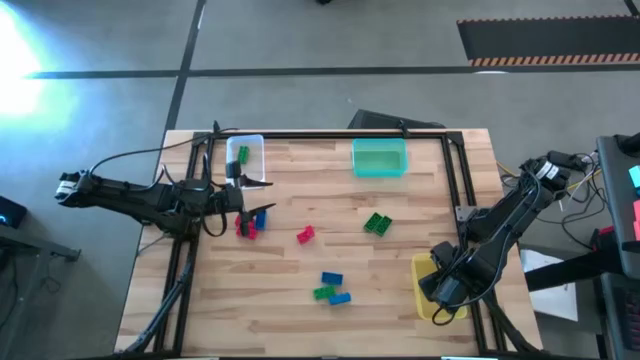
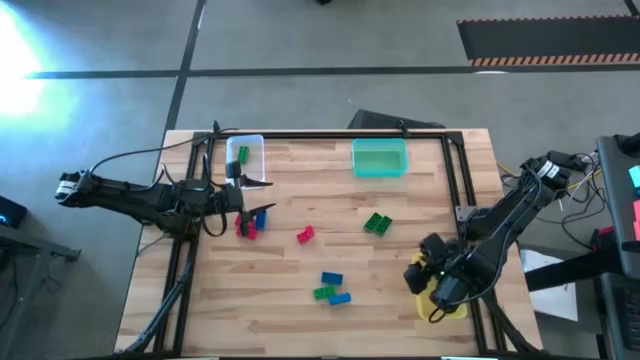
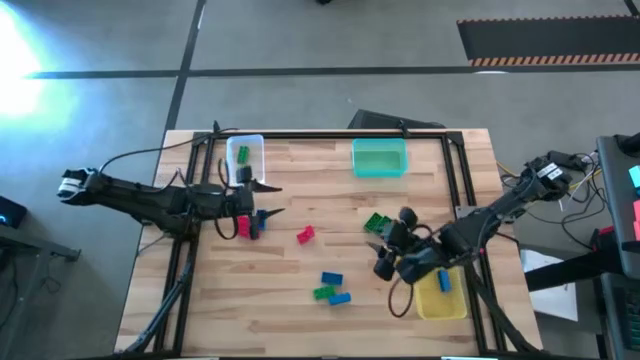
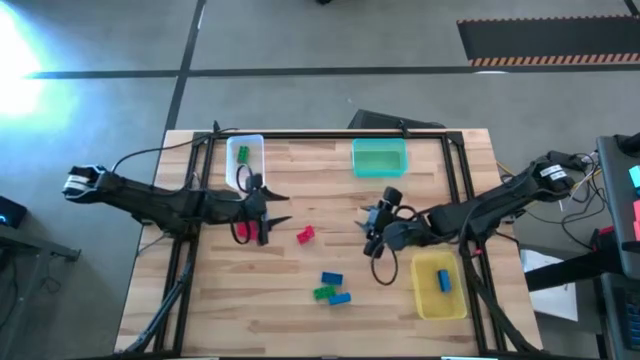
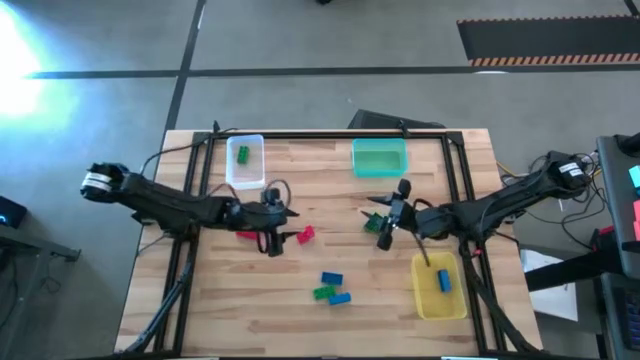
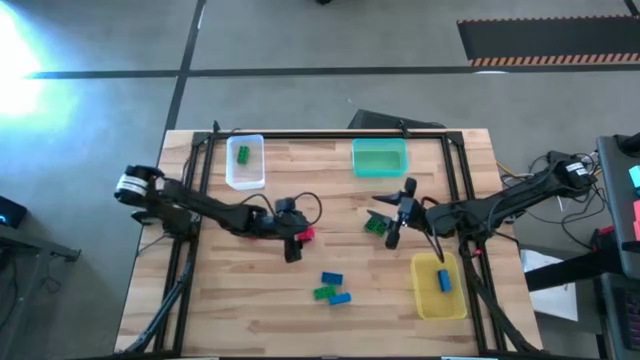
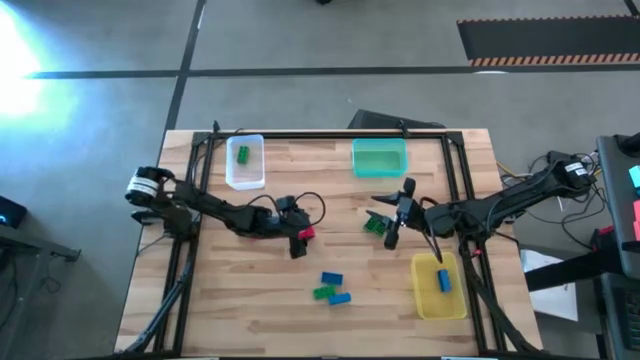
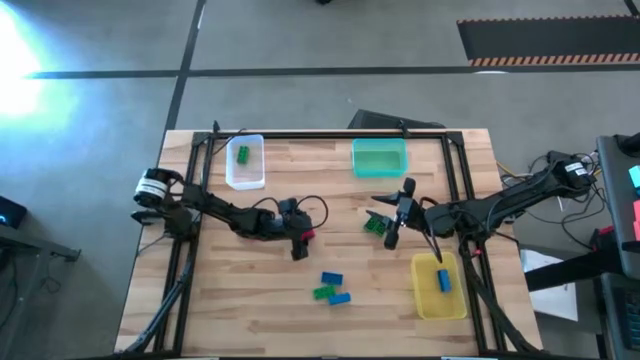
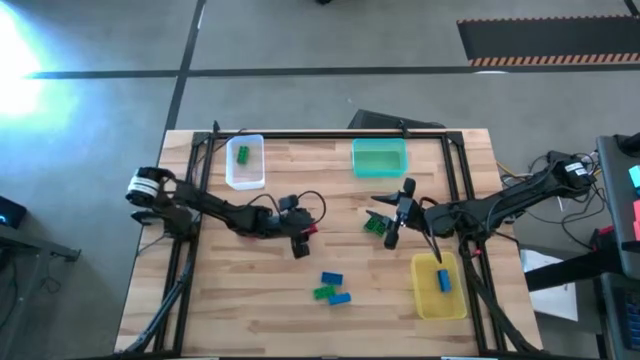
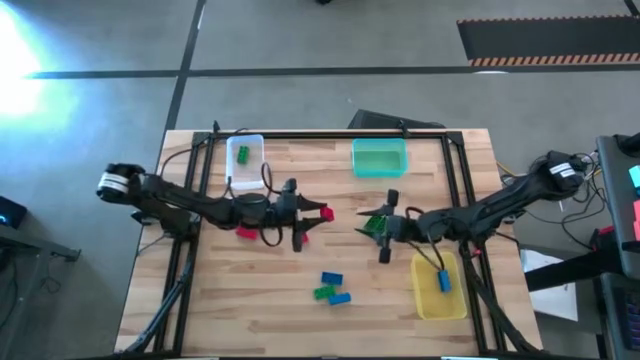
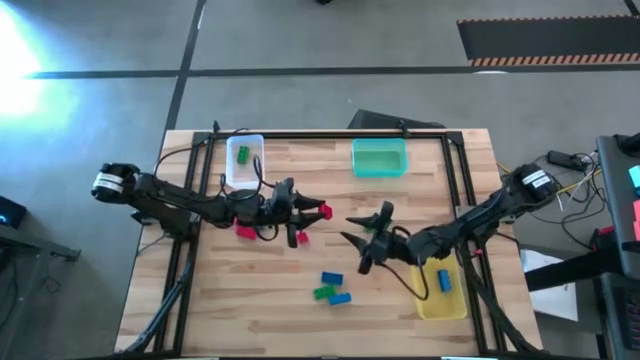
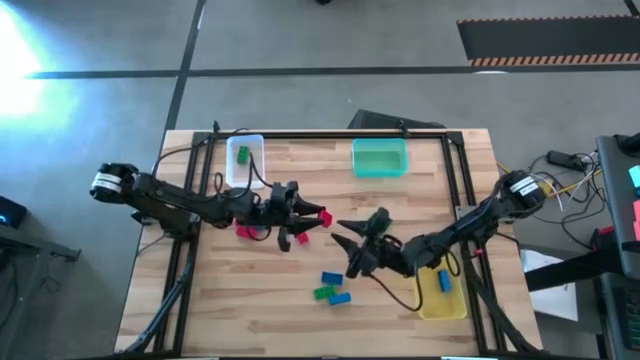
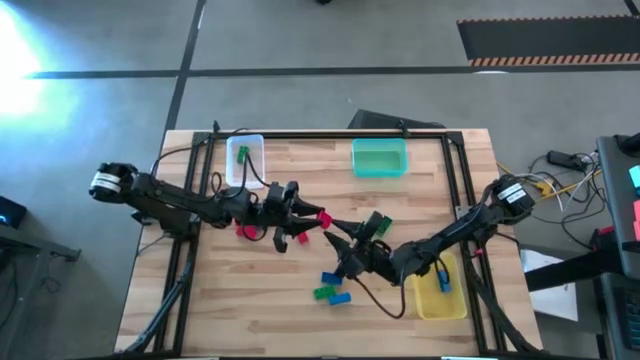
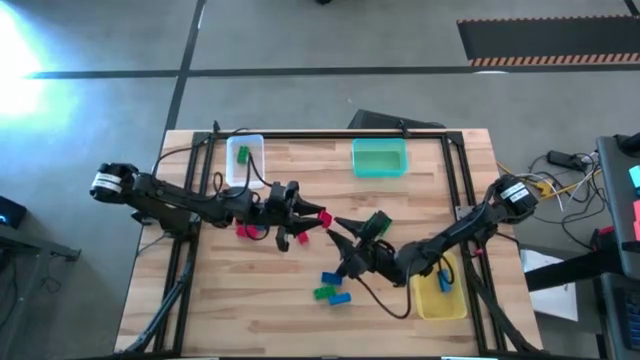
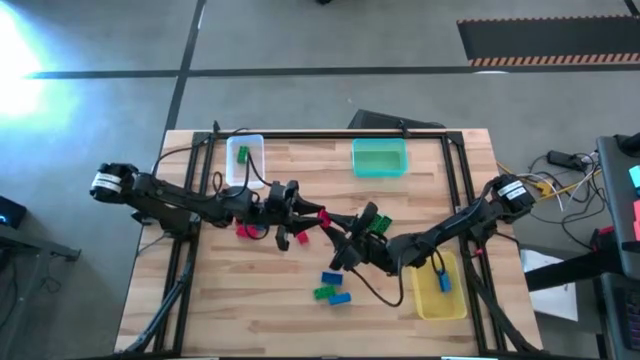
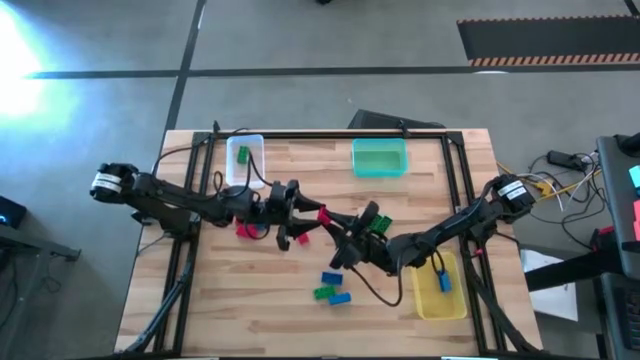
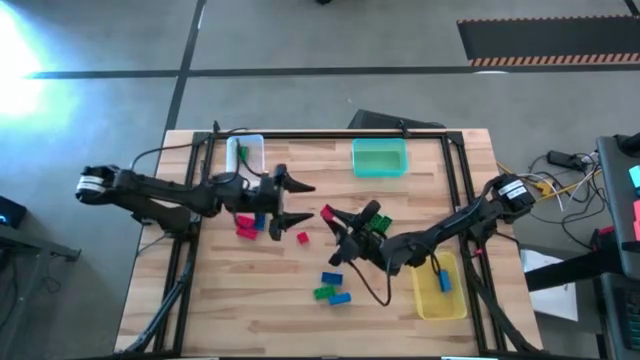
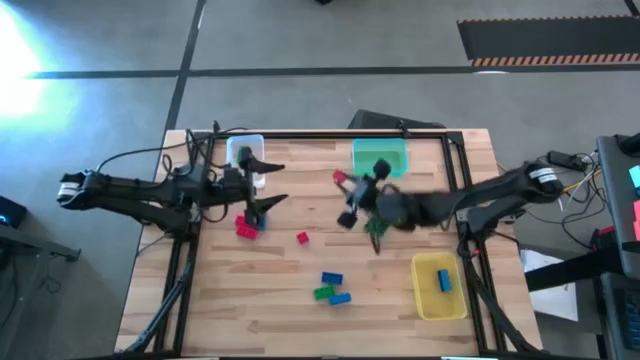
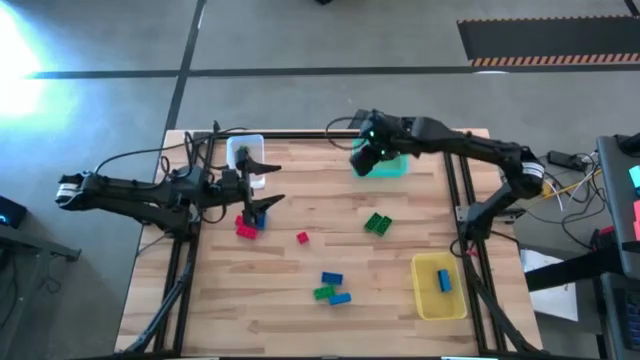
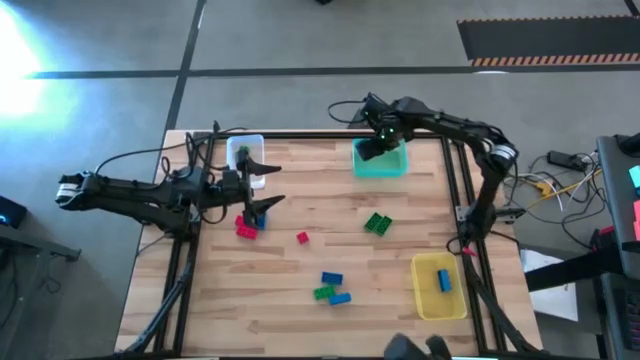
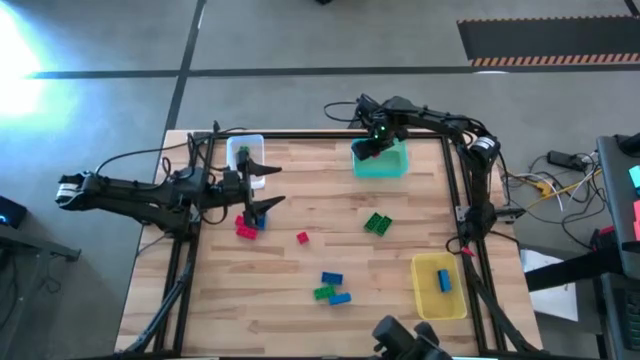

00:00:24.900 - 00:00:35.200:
Task: Sort & place blocks by color
Put the red game piece into the green bin

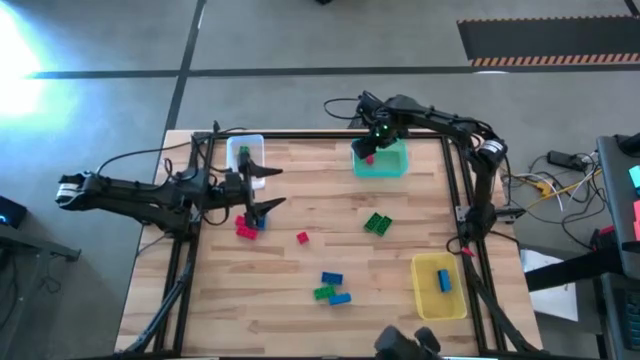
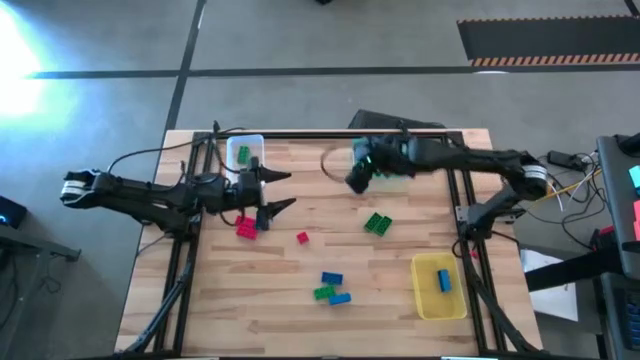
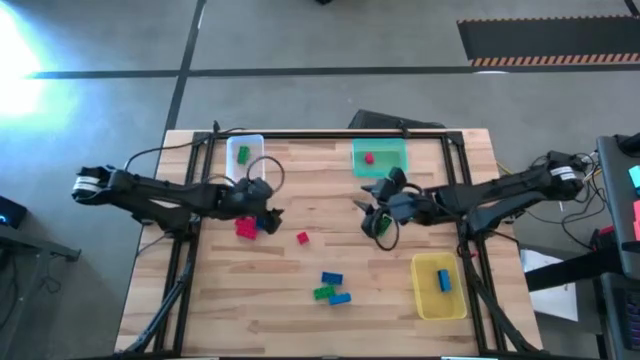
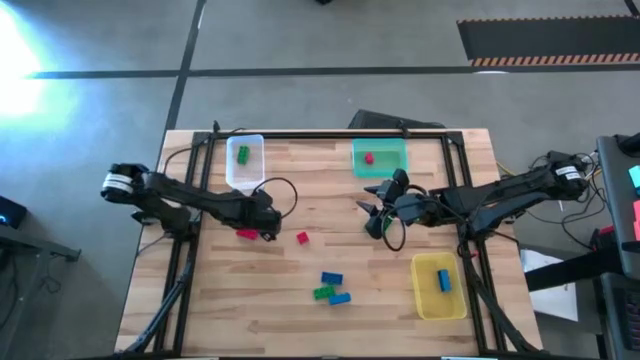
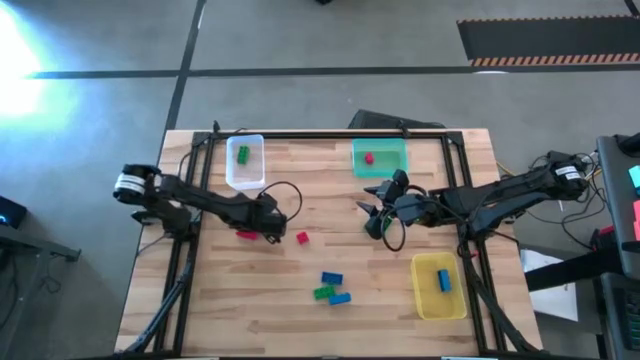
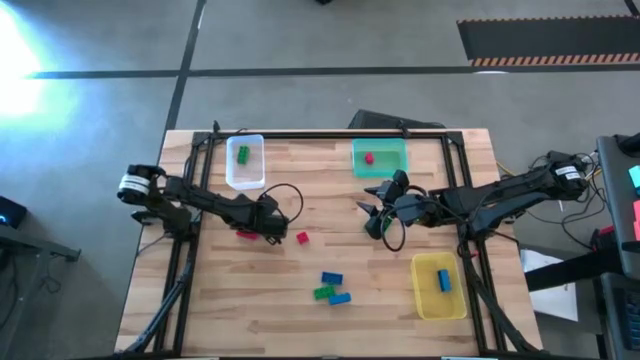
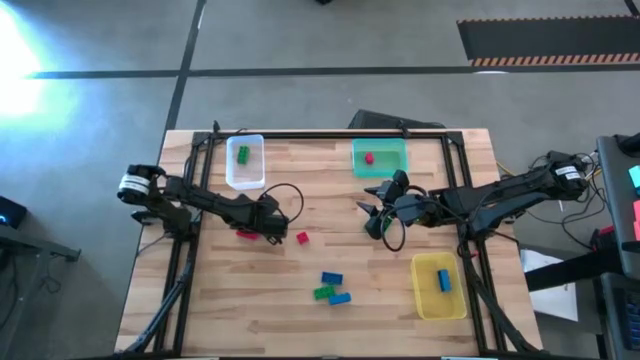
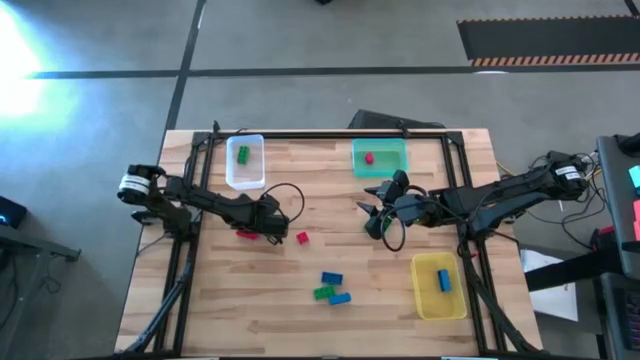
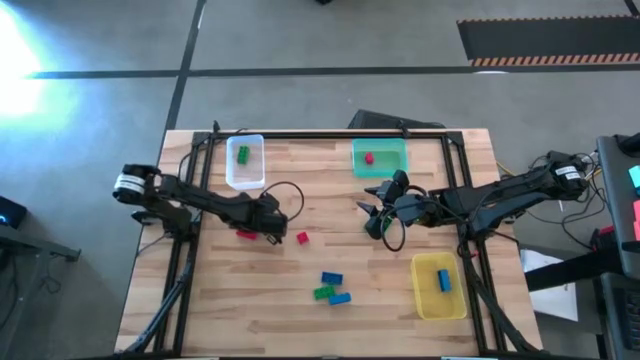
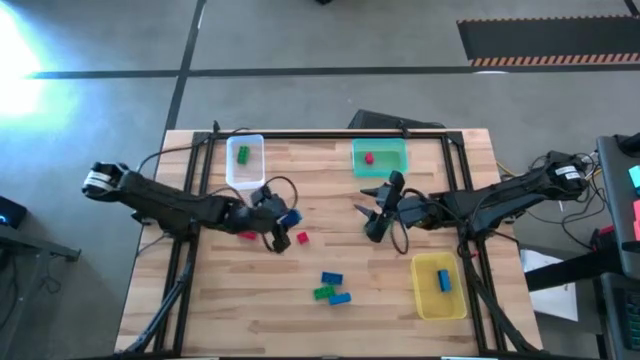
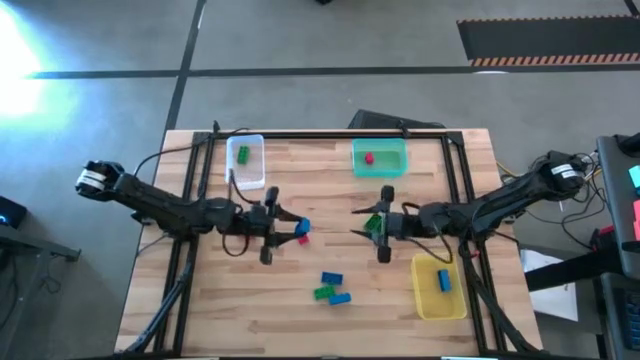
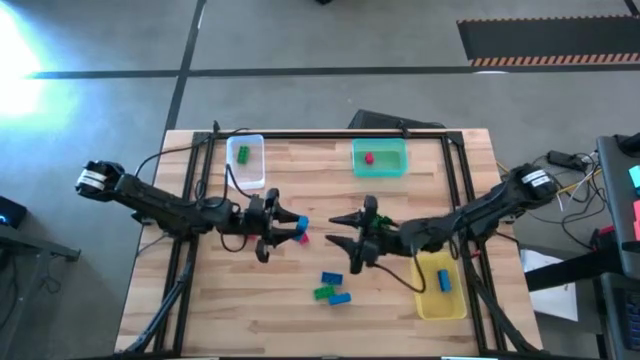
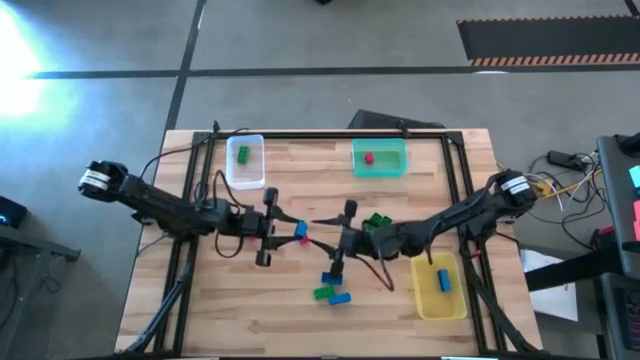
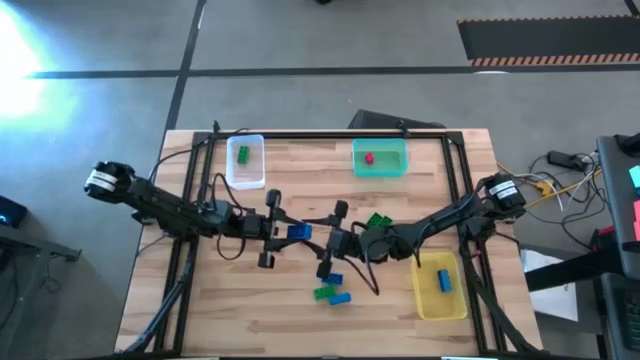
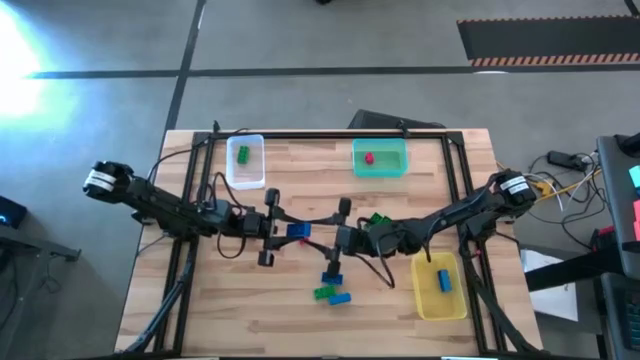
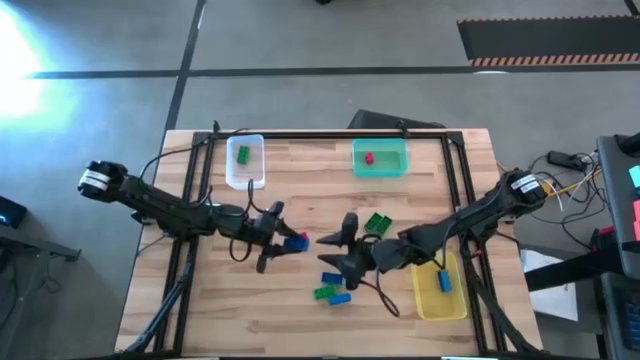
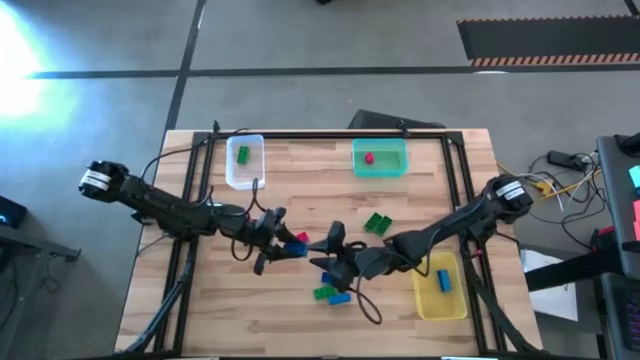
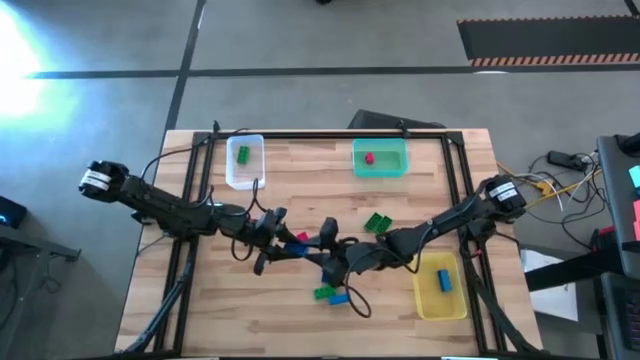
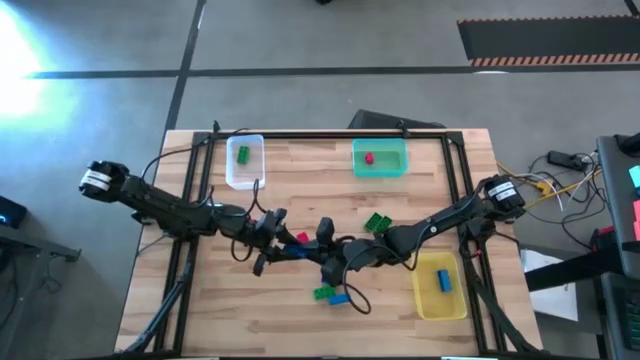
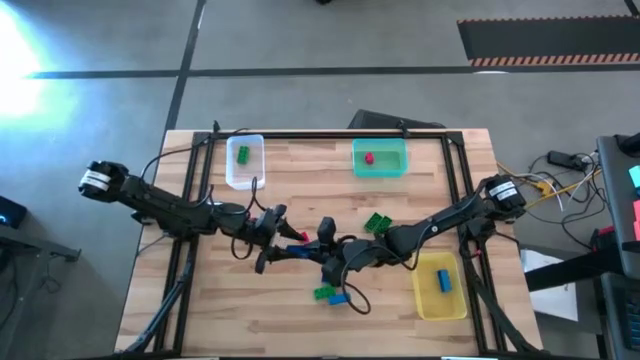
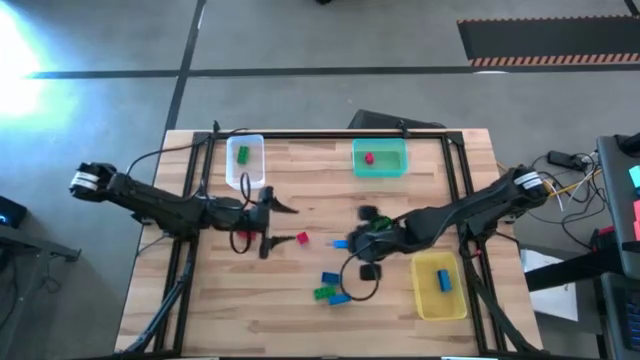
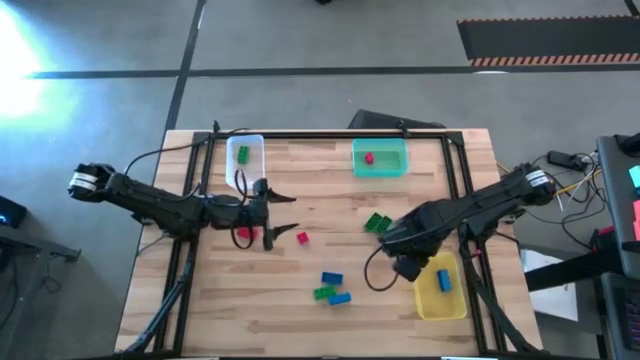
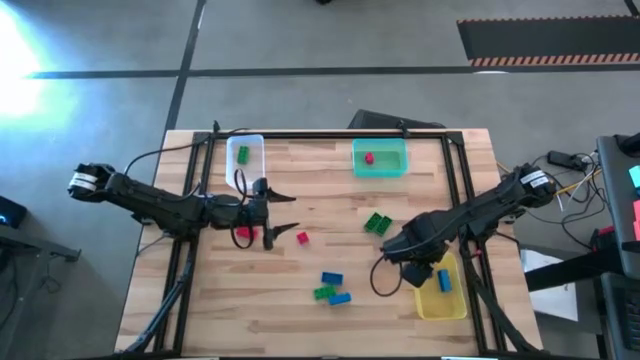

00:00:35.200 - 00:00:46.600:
Put the blue game piece into the yellow bin
